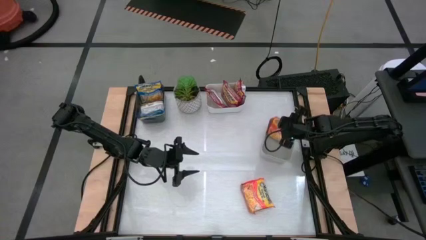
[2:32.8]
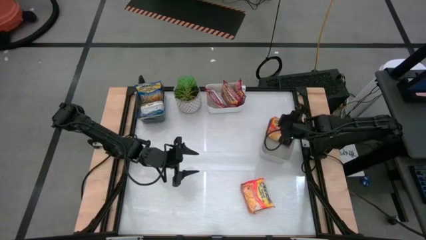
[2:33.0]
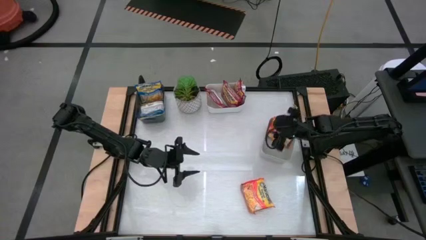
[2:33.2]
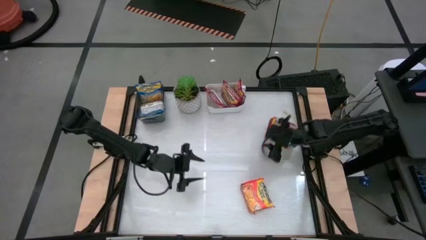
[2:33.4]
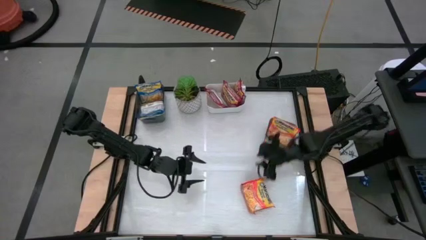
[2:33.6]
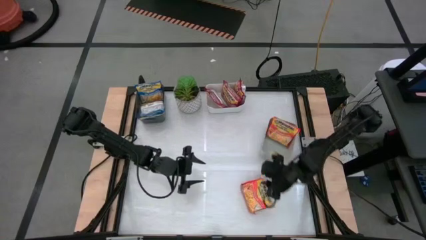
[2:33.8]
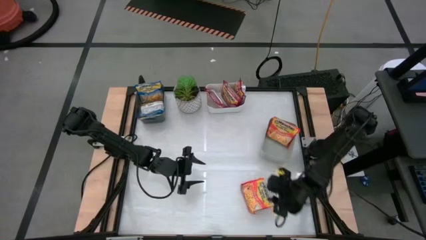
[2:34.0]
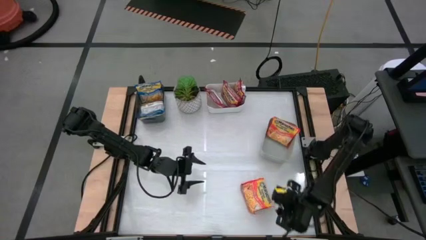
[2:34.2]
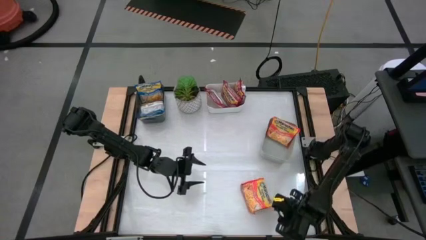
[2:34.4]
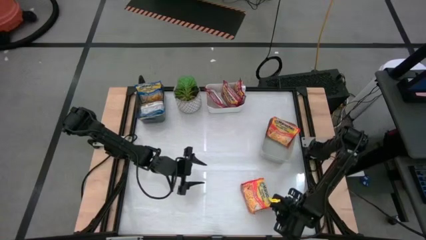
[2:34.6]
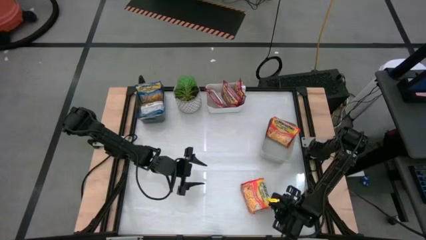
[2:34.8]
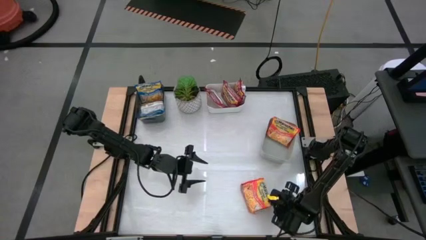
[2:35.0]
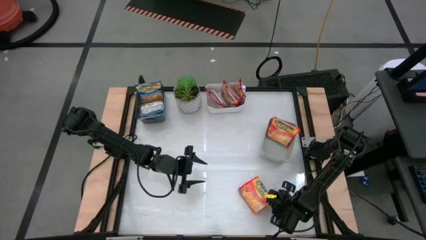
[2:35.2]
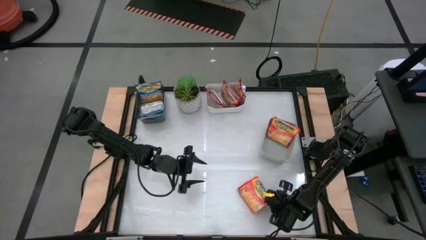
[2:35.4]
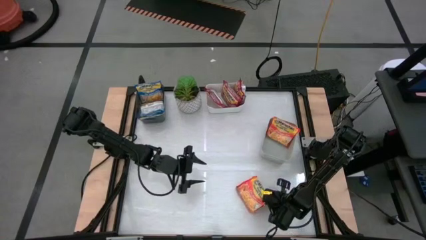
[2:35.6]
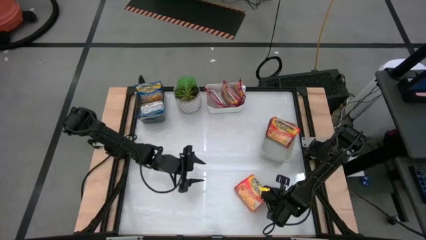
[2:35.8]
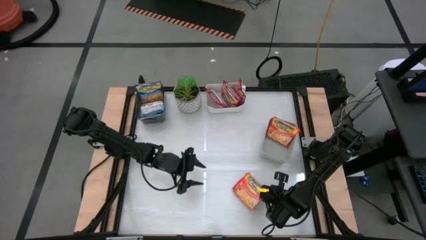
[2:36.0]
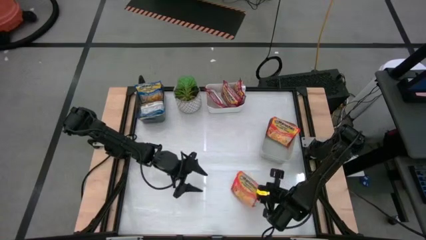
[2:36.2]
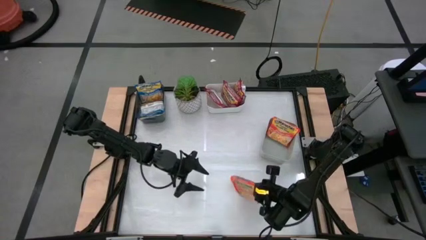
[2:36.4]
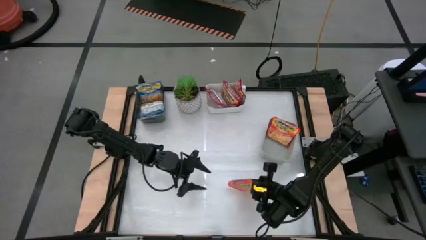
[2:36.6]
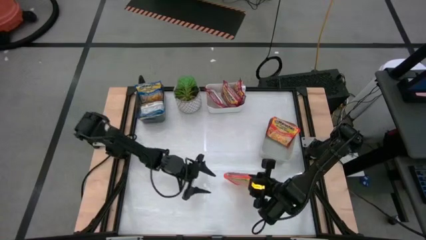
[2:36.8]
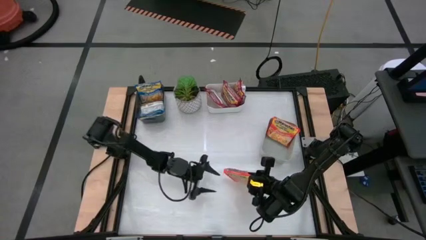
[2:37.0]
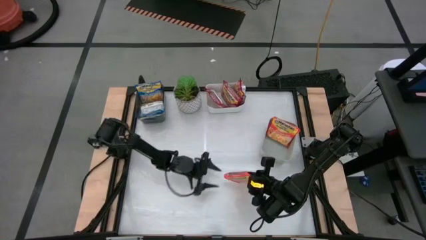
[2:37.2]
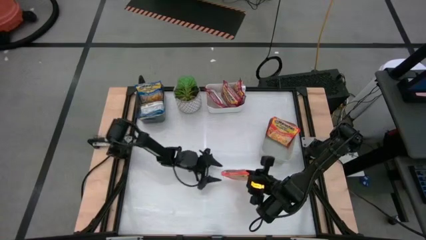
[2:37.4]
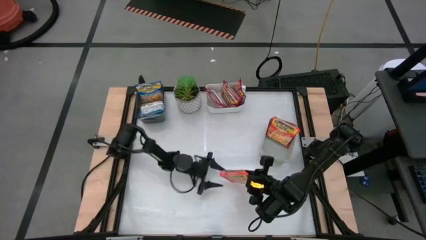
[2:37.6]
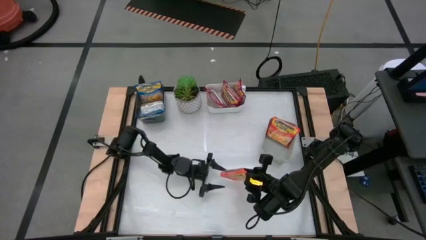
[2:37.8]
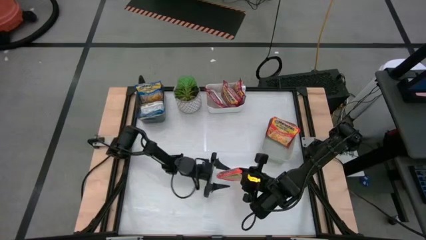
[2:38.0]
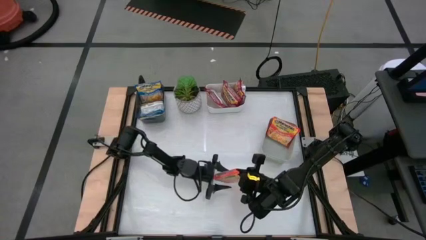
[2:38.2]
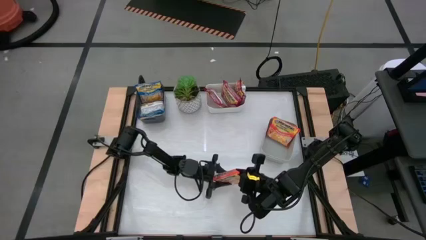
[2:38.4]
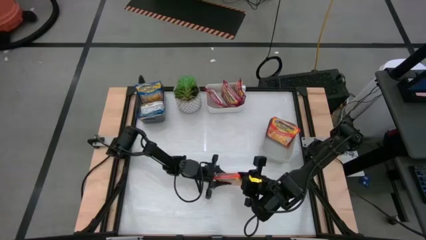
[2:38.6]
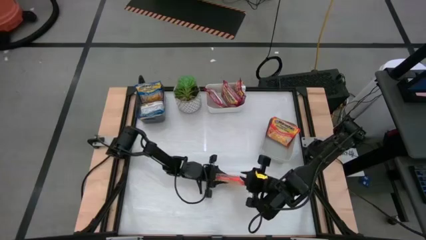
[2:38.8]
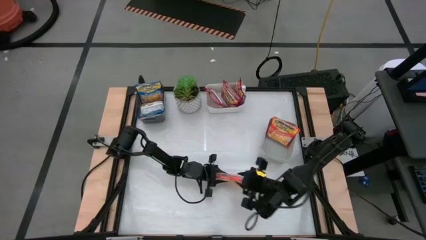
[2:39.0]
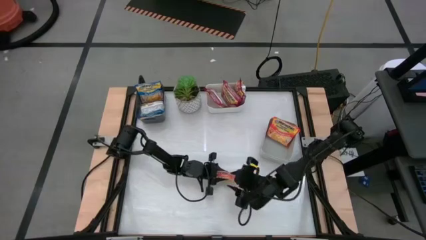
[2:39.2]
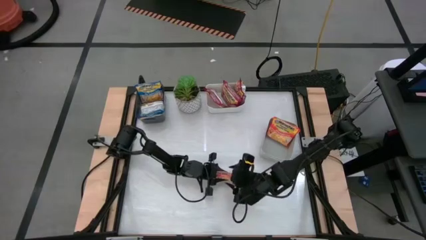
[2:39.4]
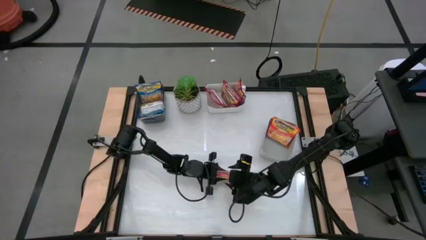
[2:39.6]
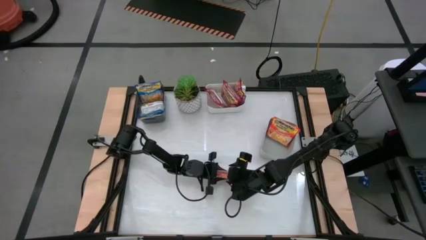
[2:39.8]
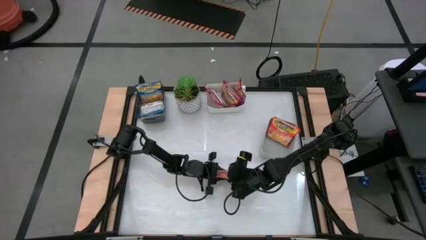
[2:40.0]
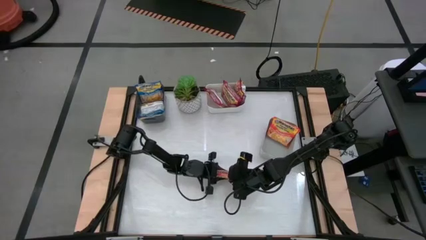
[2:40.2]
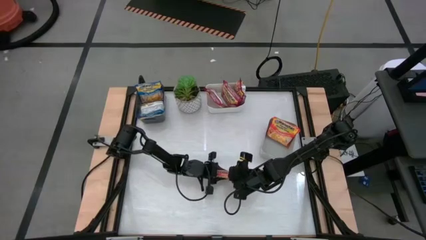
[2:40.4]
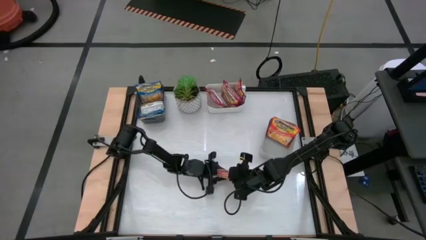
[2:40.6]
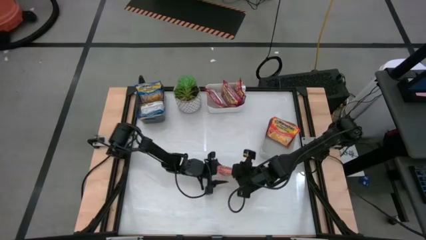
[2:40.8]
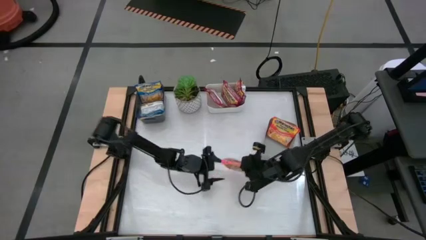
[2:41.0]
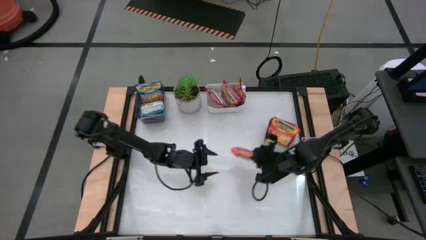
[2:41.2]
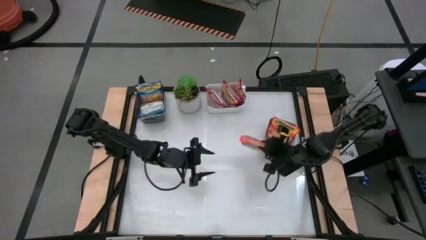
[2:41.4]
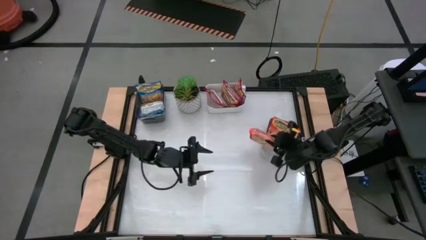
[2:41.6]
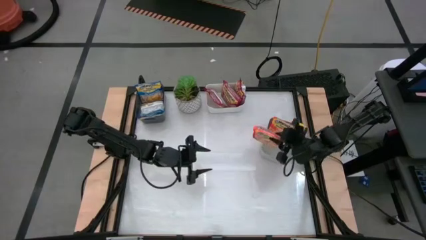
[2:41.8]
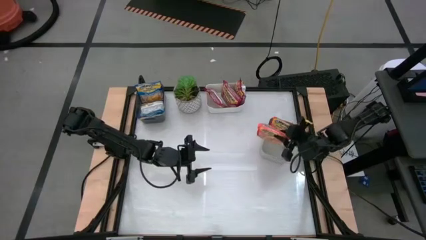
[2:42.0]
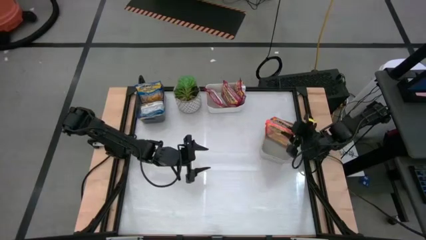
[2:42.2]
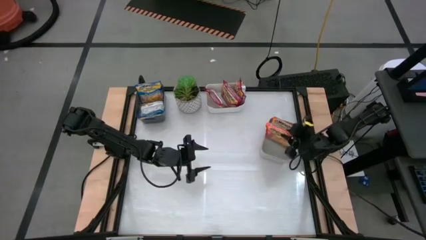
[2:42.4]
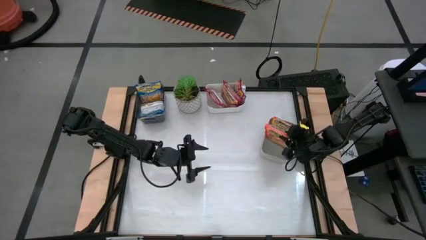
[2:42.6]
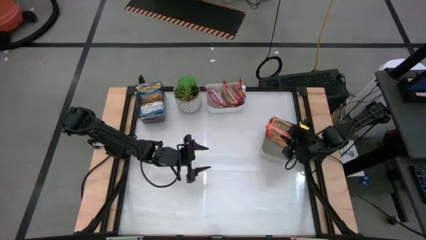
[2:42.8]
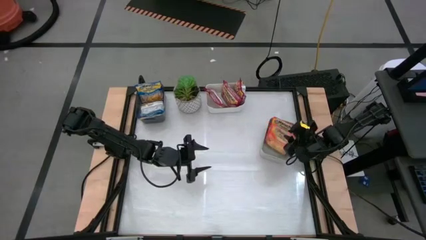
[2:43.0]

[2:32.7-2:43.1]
Task: Sort Maruchan noodles
Put the orange noodle pack into the gray bin

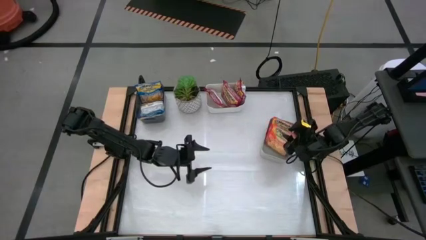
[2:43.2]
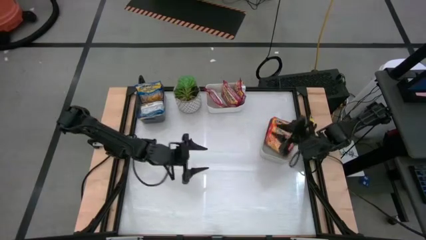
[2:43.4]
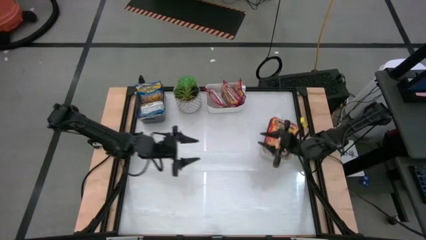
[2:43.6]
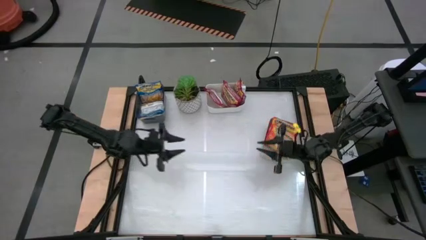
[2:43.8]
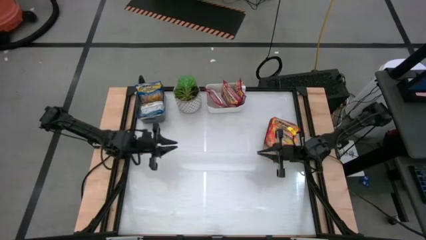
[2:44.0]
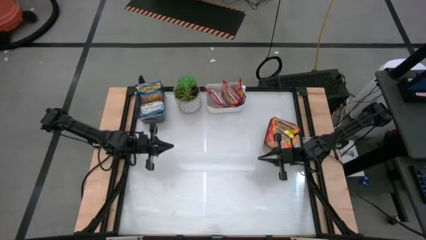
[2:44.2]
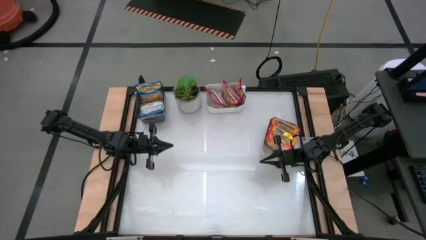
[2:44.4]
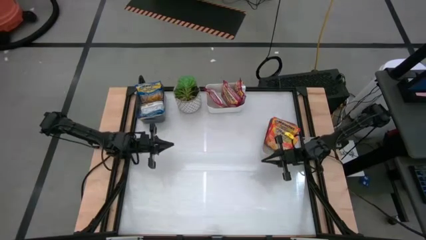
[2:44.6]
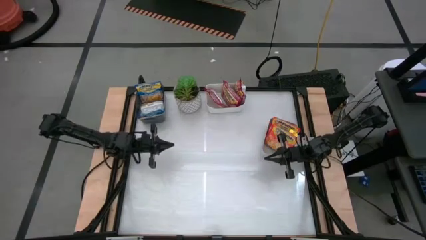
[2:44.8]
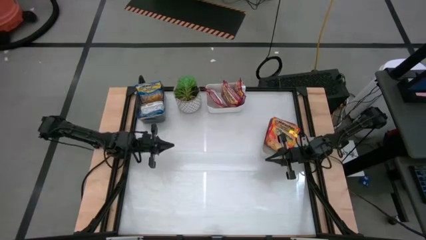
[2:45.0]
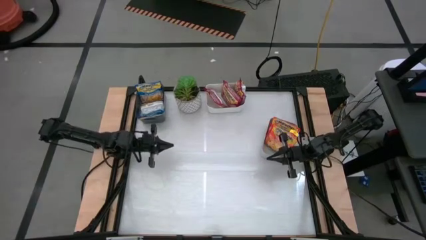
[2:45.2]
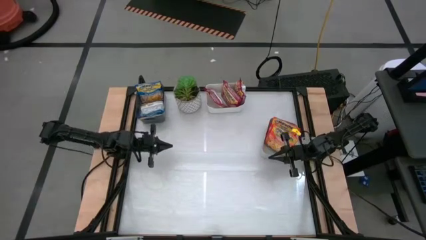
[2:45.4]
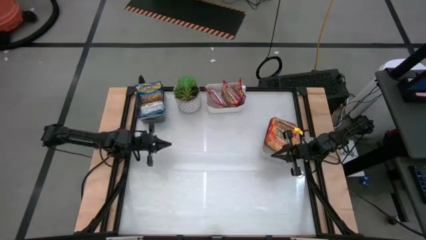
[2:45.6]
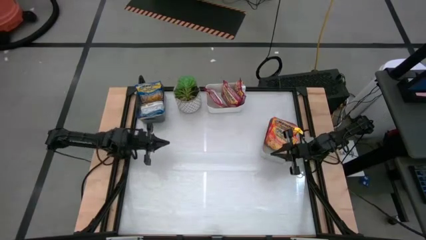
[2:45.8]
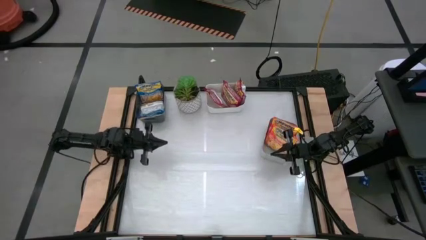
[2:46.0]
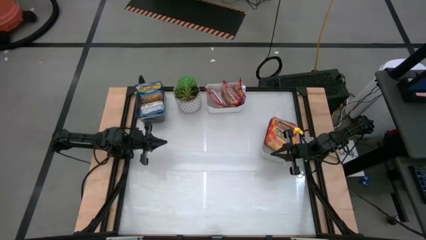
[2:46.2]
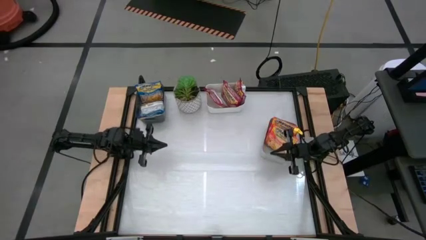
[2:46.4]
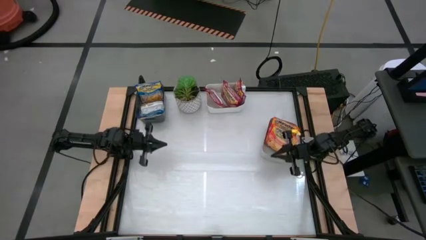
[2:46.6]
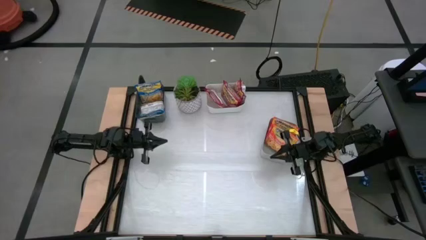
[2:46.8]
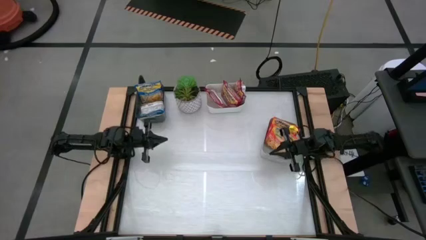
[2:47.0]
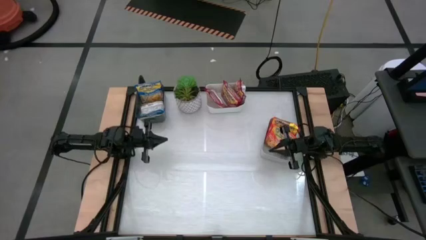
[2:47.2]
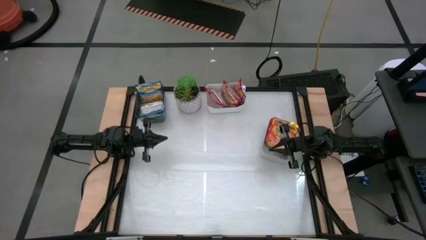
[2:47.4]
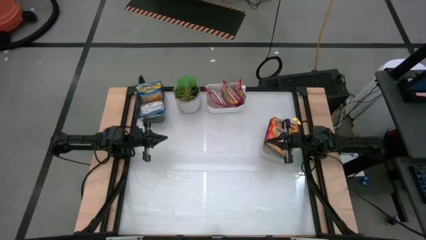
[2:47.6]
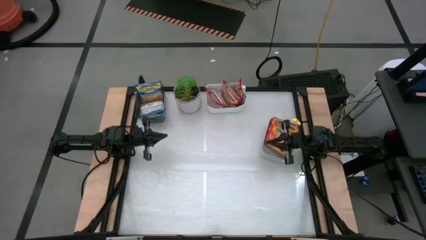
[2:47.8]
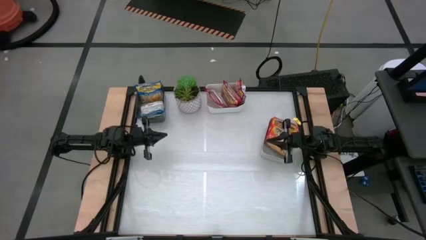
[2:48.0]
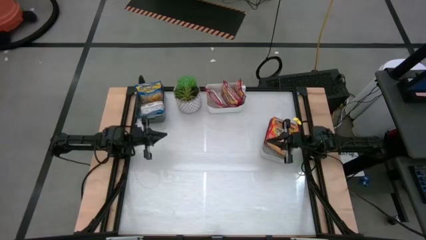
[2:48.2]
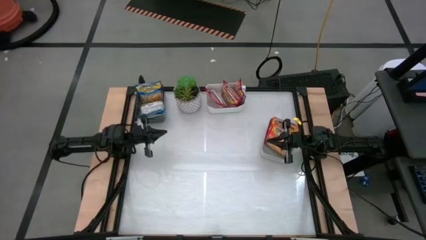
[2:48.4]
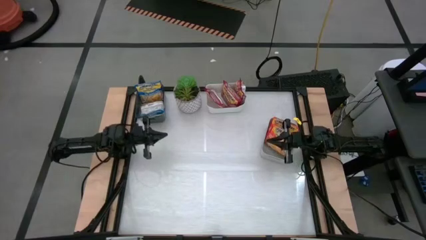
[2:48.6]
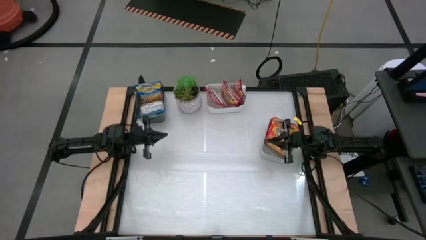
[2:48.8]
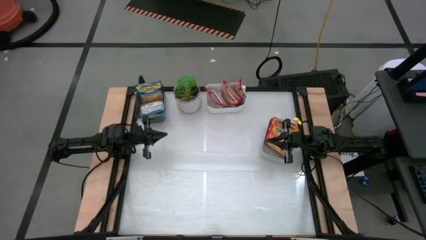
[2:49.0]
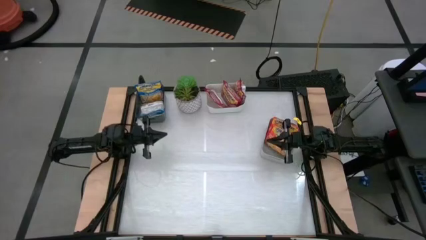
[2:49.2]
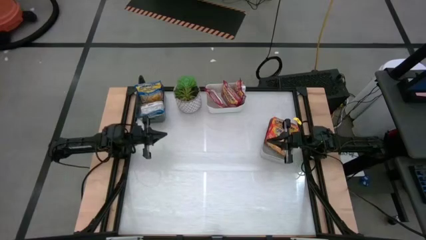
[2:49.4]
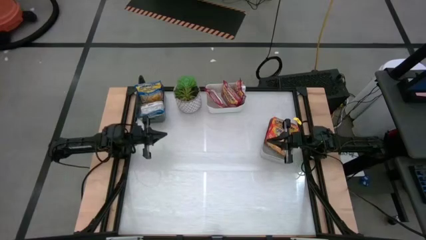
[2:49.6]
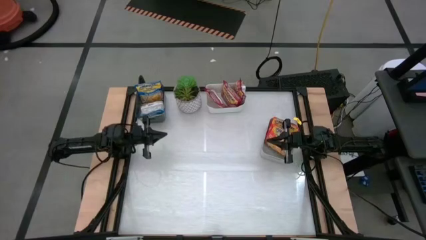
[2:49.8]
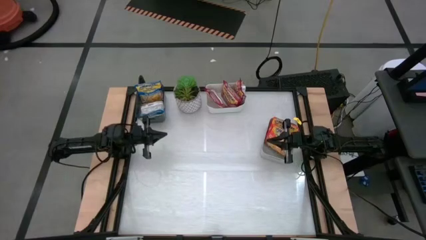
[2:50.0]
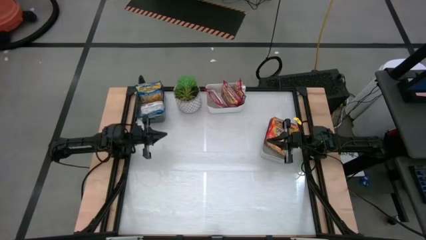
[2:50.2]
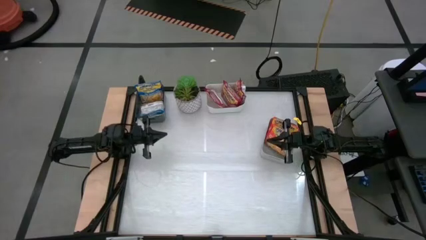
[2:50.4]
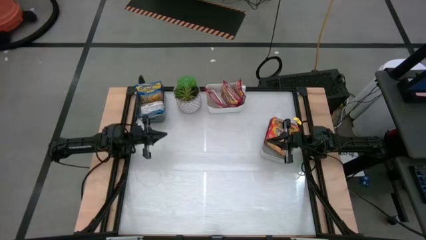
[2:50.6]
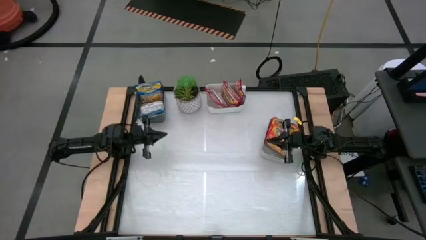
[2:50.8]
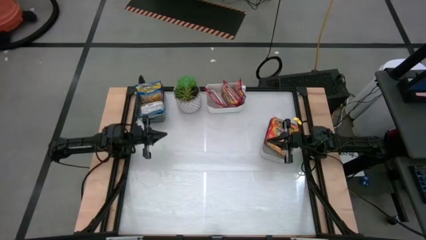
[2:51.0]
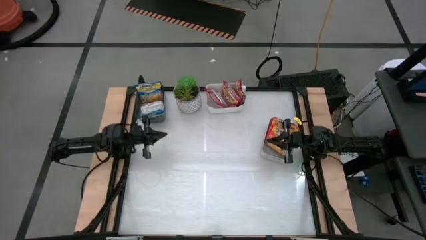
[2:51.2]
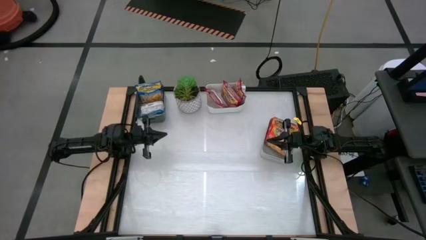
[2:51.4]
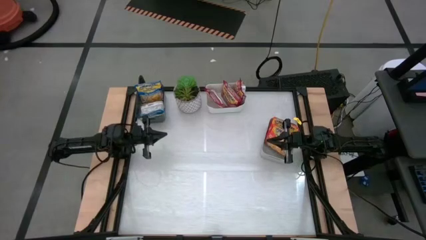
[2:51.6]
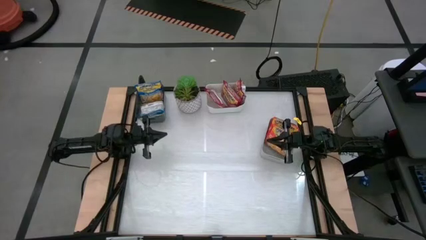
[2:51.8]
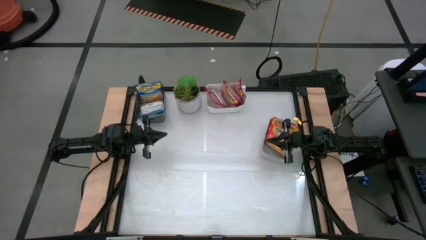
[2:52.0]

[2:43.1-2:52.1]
Return to Home Position
